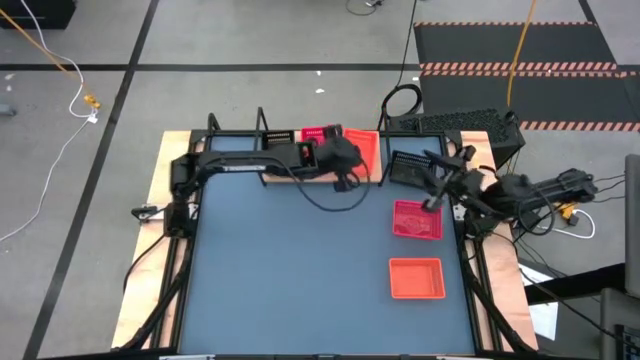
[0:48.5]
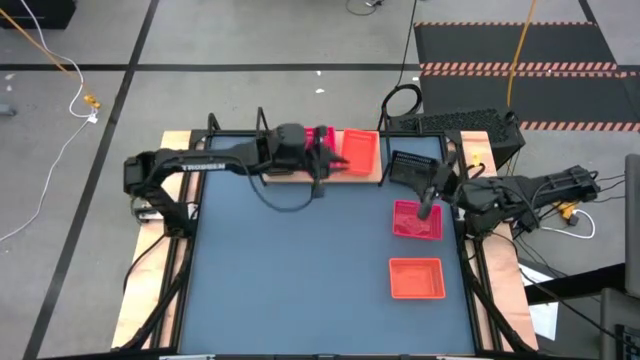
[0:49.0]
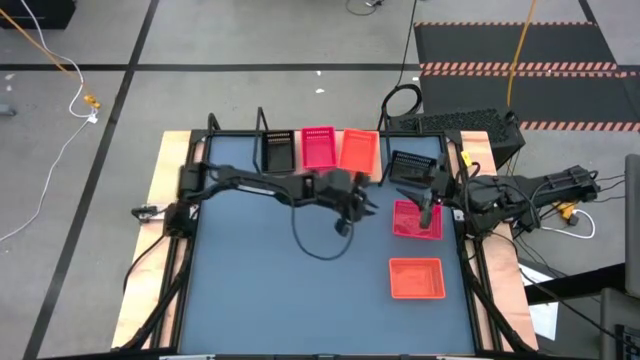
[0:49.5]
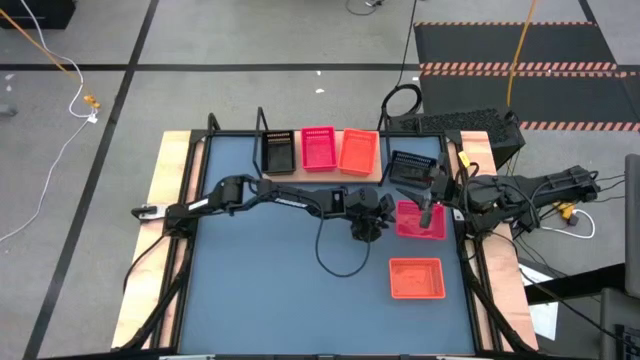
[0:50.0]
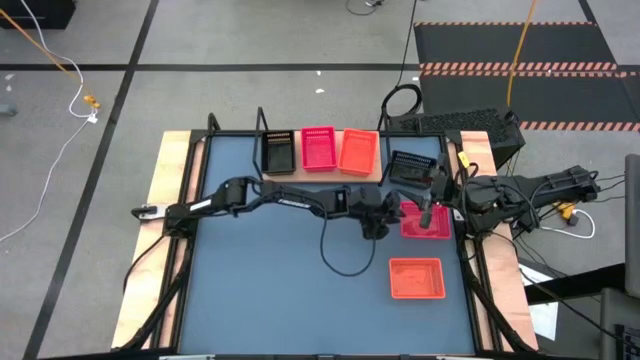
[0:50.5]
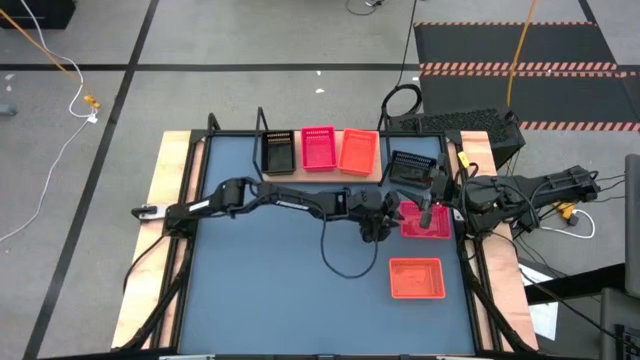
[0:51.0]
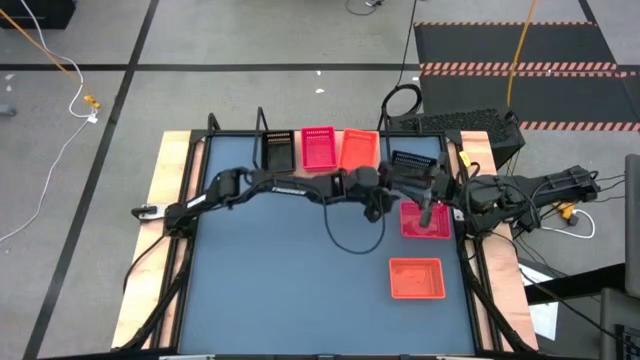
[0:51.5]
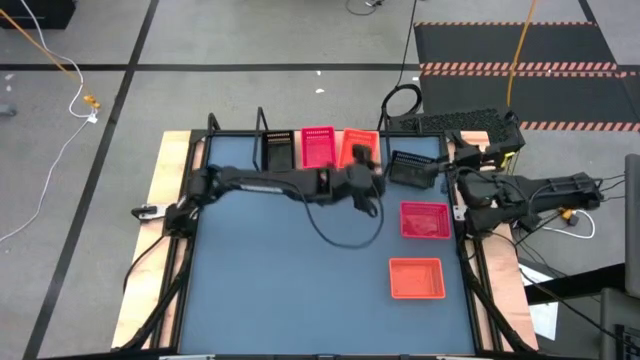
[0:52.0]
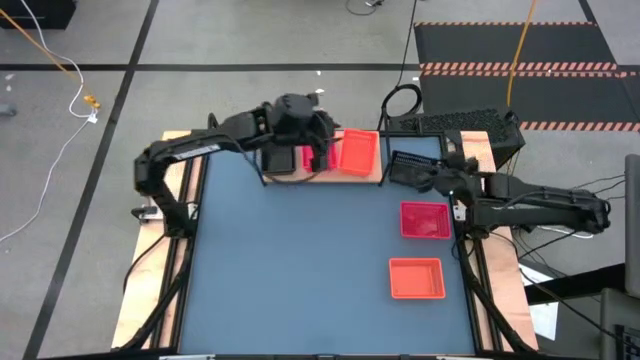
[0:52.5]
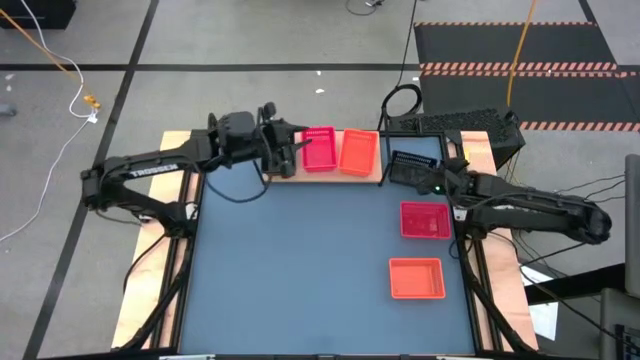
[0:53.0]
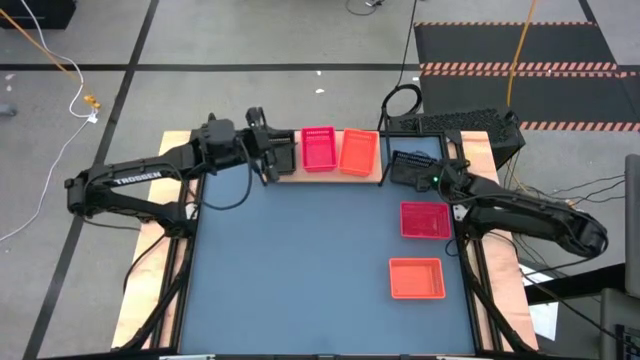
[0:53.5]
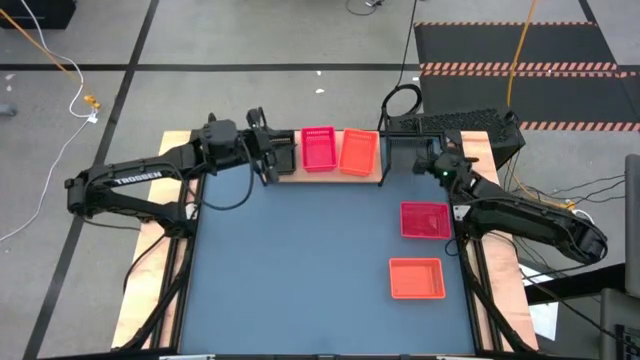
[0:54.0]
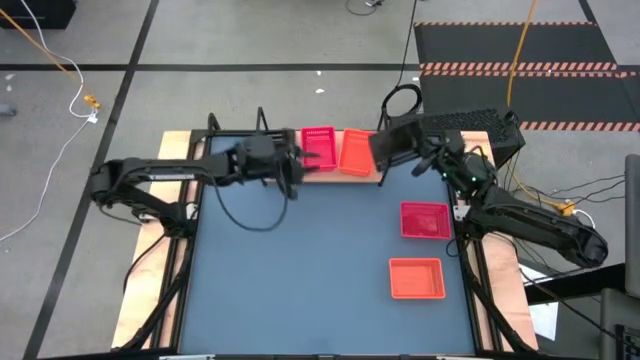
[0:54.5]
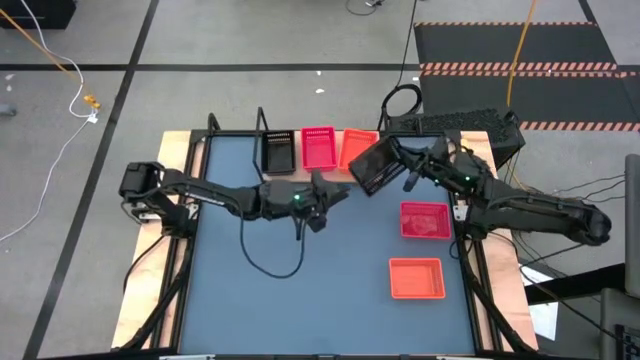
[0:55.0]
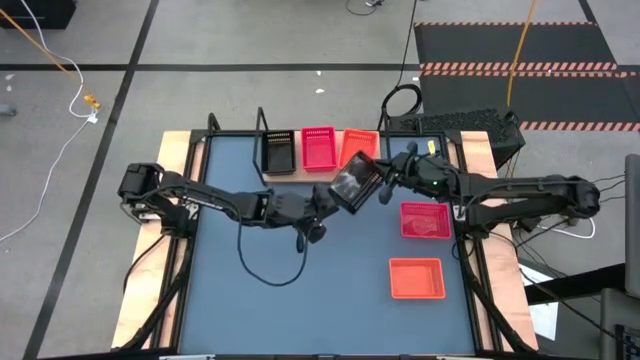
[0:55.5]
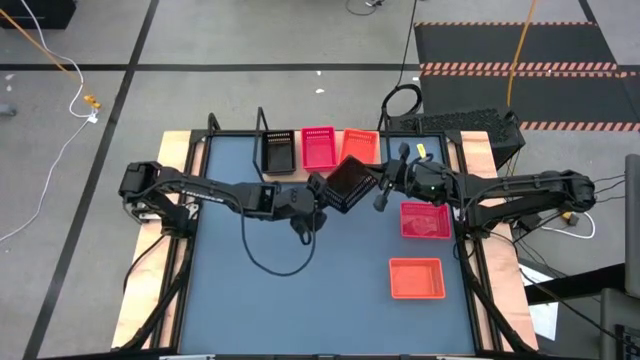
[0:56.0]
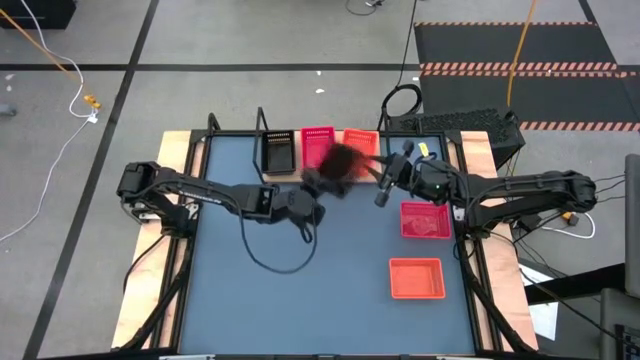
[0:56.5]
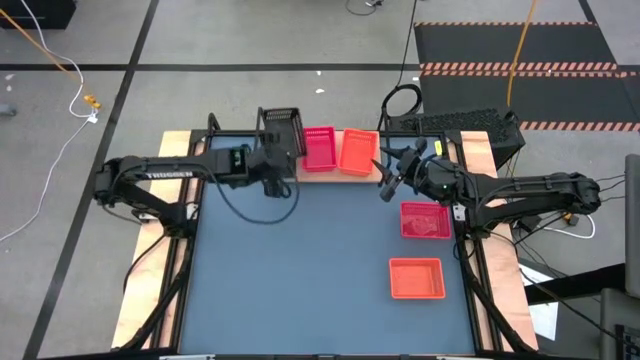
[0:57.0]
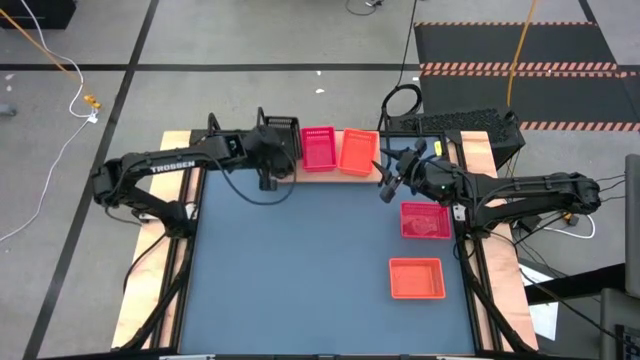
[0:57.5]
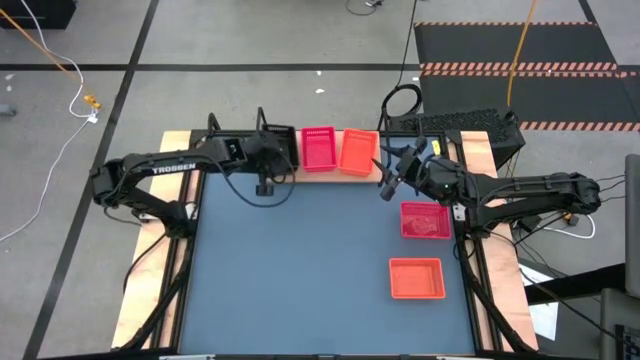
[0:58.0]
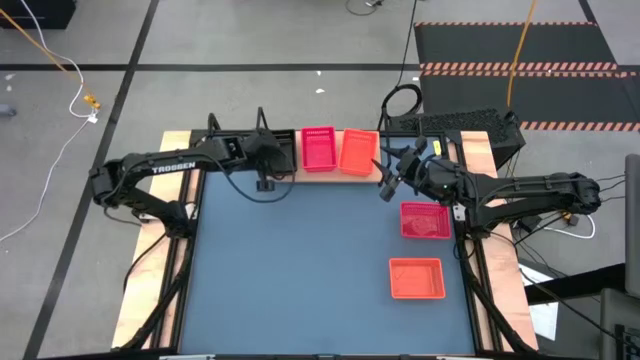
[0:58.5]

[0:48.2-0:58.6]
Task: Stack baskets on shelf by color
Stack the black basket on top of the black basket on the shelf

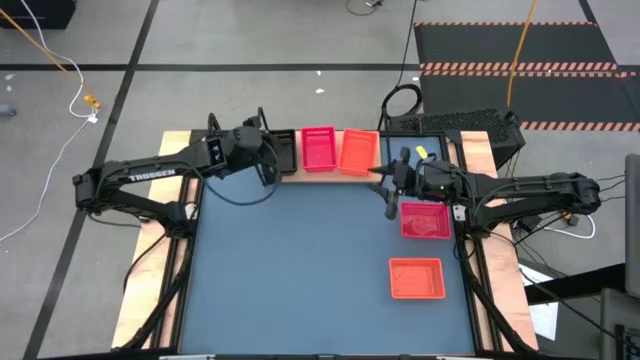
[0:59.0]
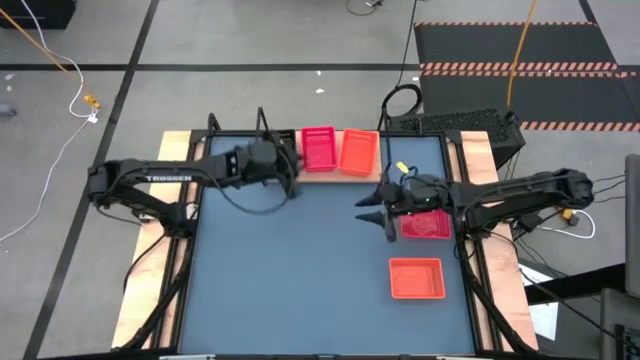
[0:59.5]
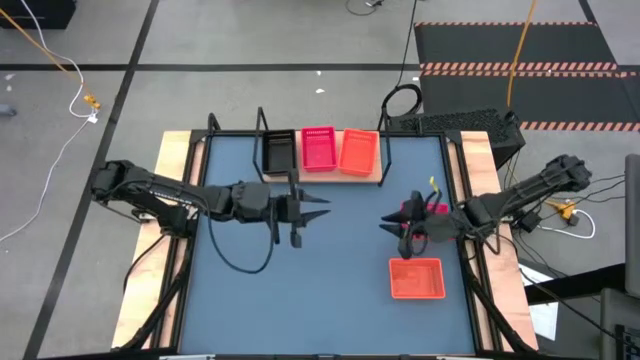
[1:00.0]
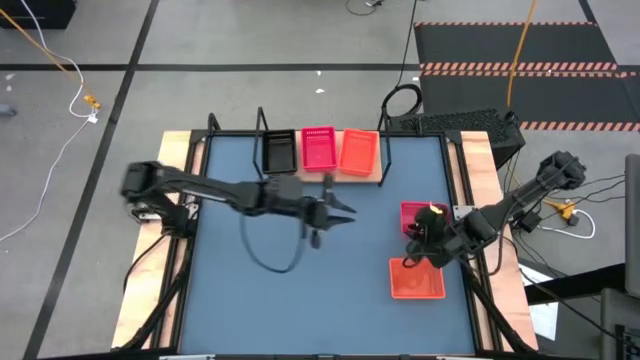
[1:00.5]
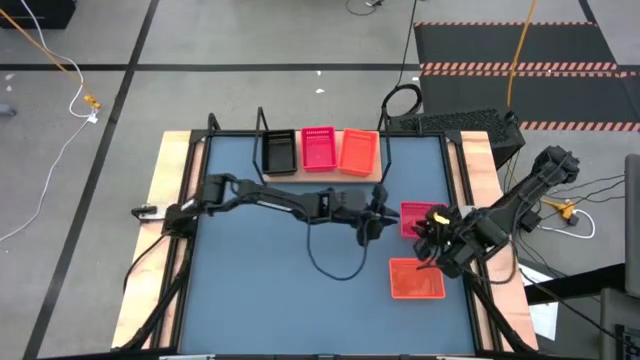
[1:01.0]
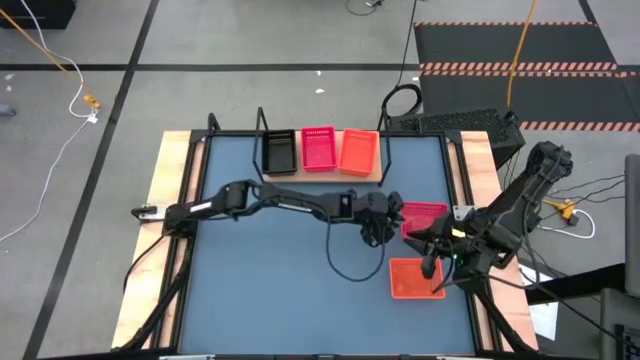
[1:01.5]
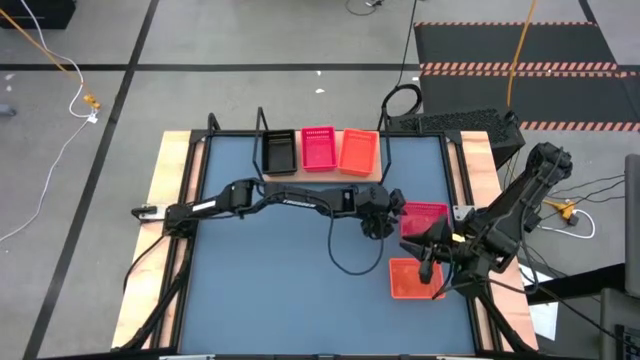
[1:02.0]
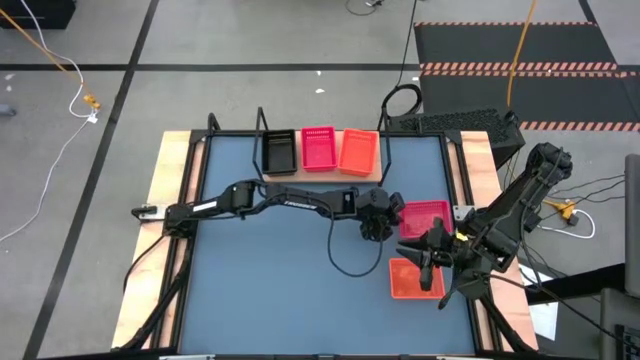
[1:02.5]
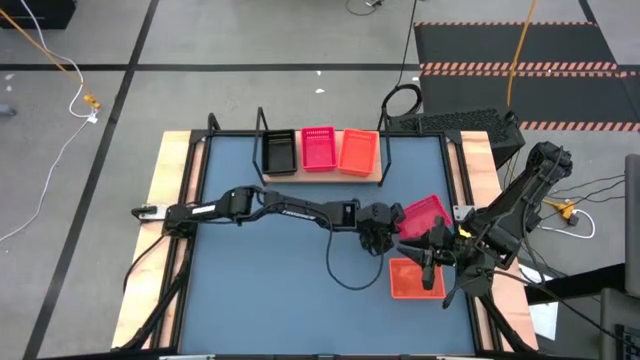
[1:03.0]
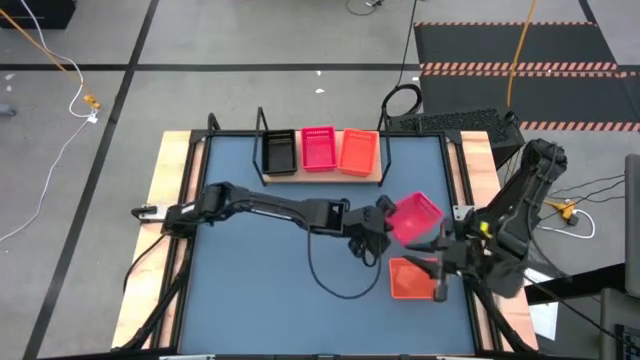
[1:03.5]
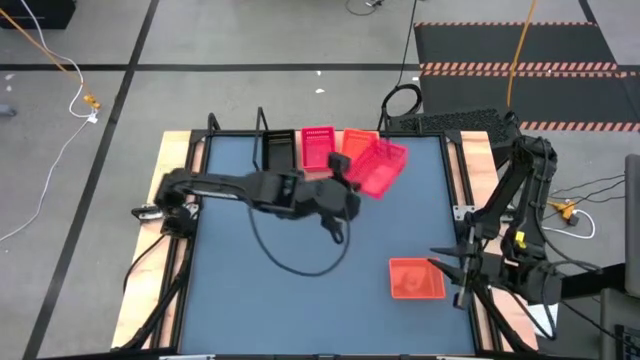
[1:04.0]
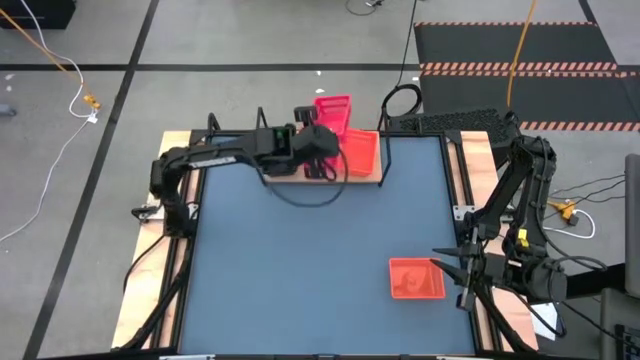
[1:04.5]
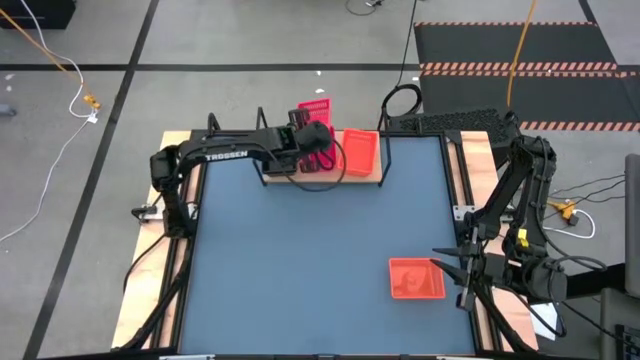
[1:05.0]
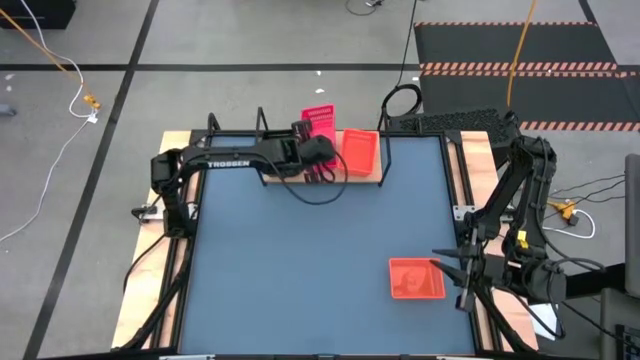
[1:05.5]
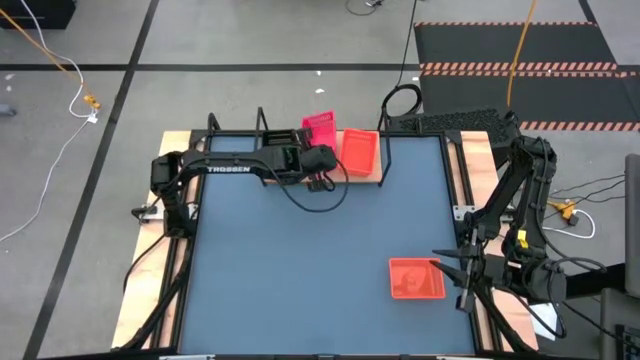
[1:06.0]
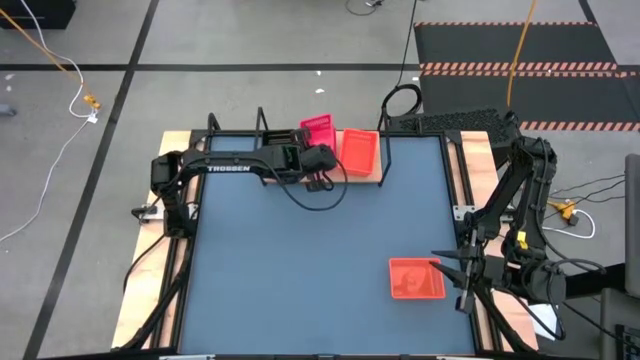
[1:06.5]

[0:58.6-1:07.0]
Stack the red basket on top of the red basket on the shelf

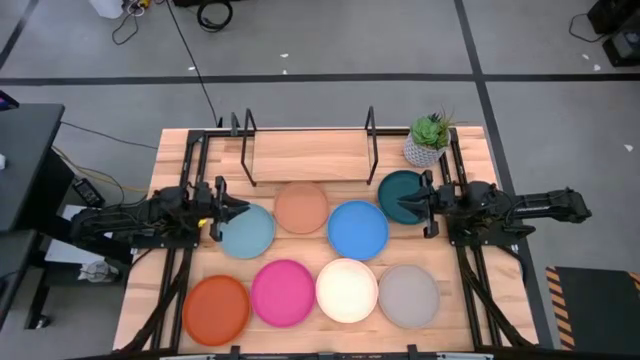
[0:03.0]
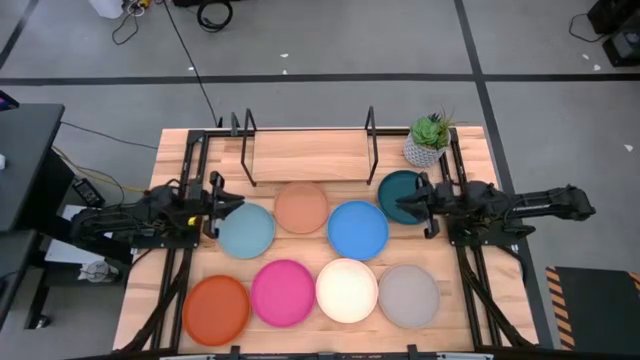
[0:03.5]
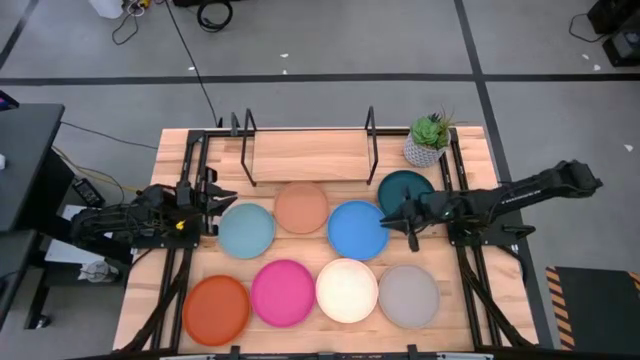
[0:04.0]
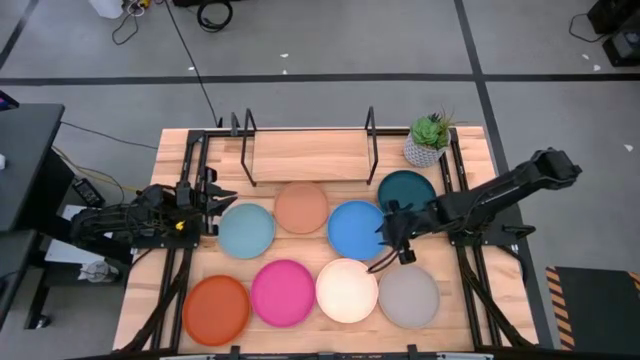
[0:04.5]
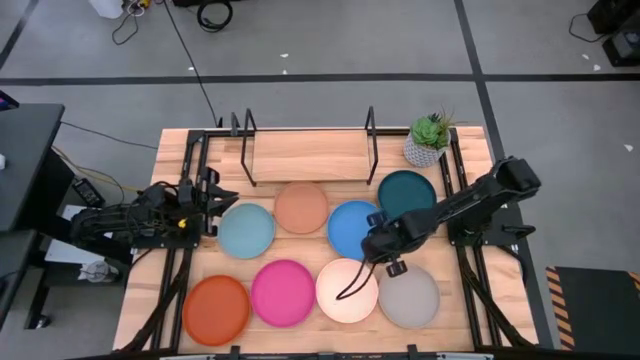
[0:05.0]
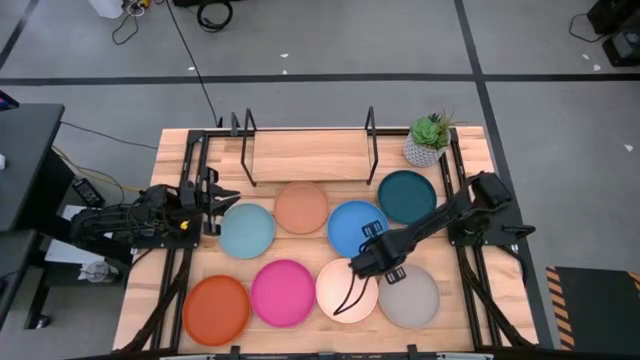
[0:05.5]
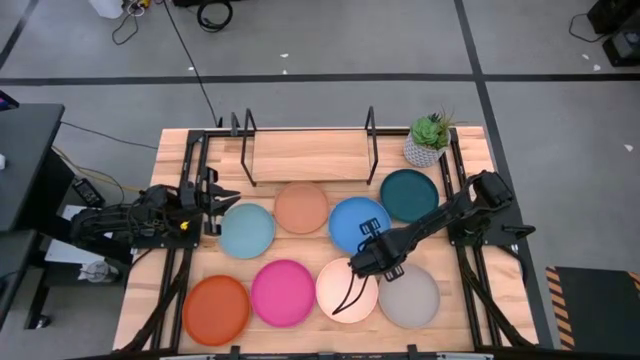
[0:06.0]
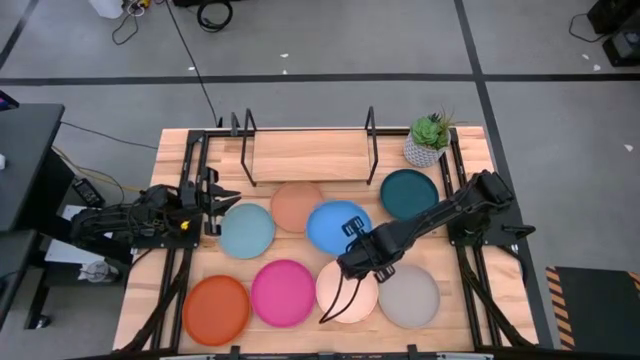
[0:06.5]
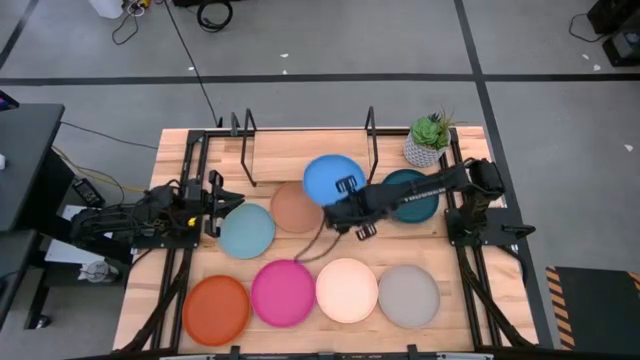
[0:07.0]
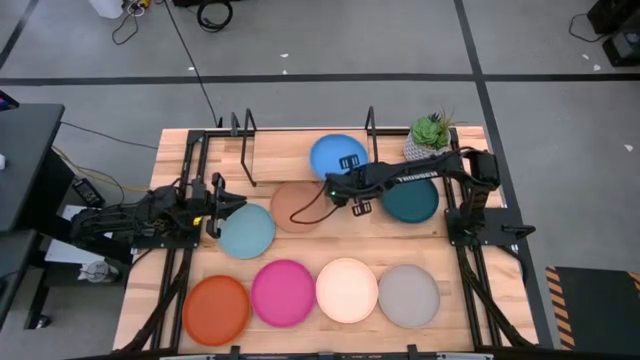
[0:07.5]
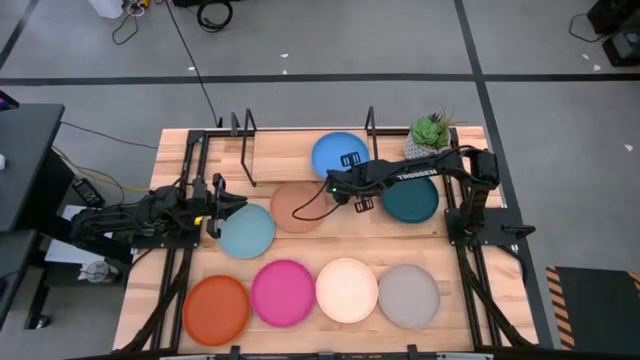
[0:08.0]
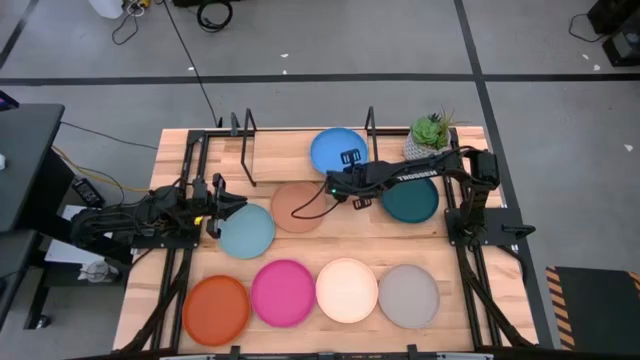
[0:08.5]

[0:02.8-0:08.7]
Task: Place and stack plates onto a shelf
Put the blue plate onto the shelf
